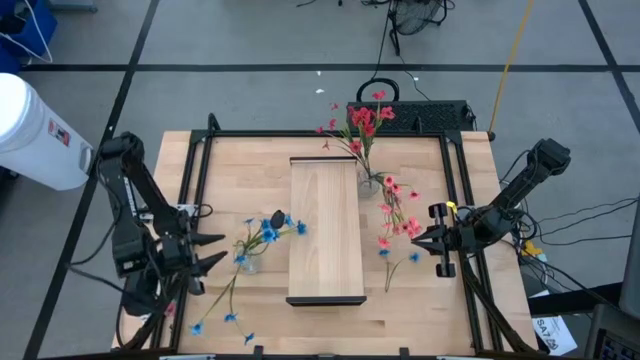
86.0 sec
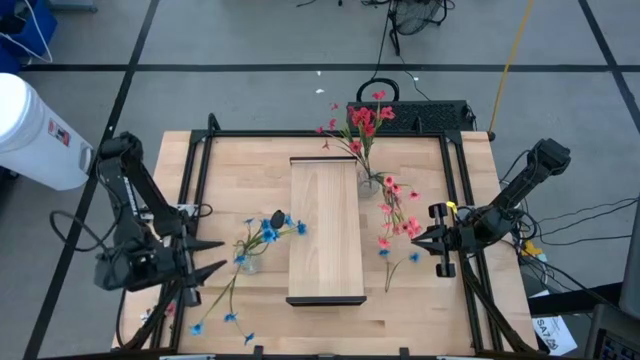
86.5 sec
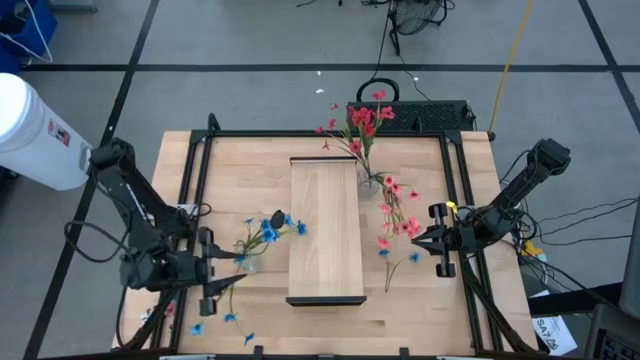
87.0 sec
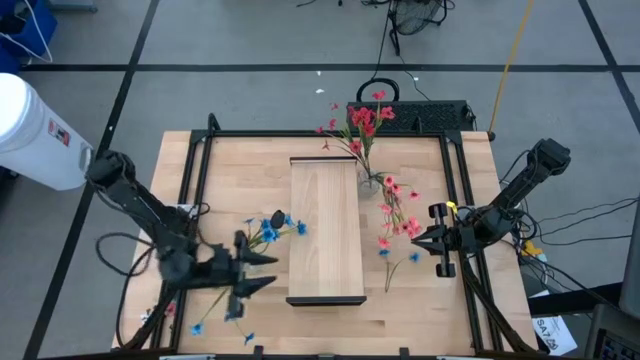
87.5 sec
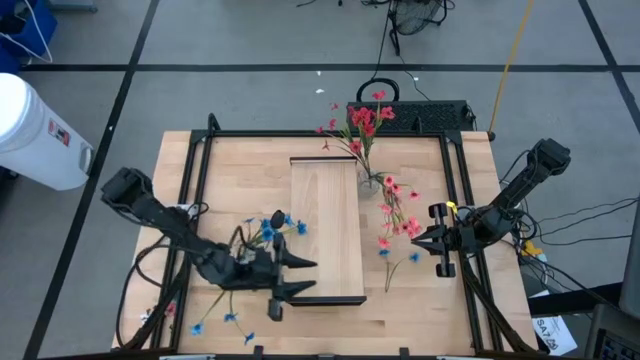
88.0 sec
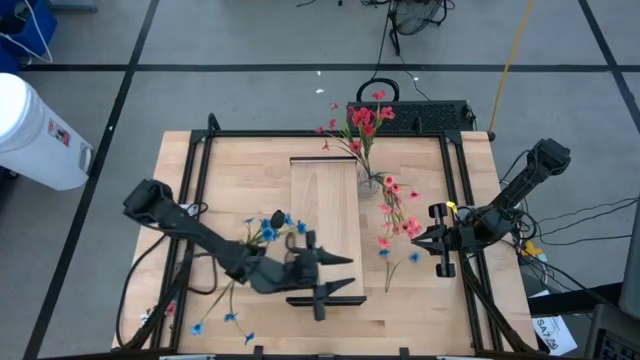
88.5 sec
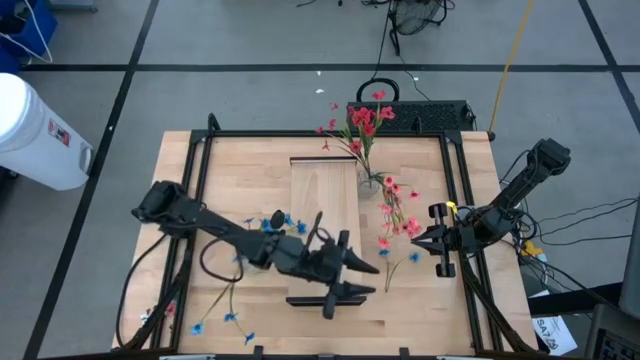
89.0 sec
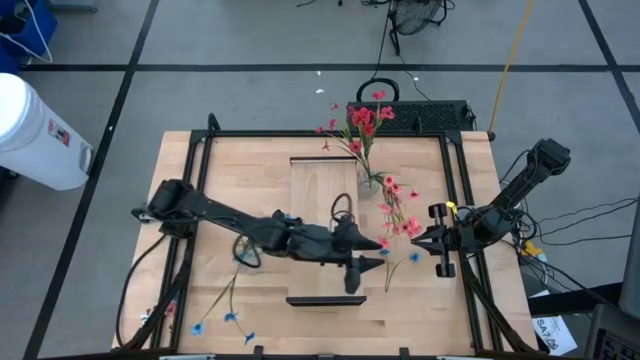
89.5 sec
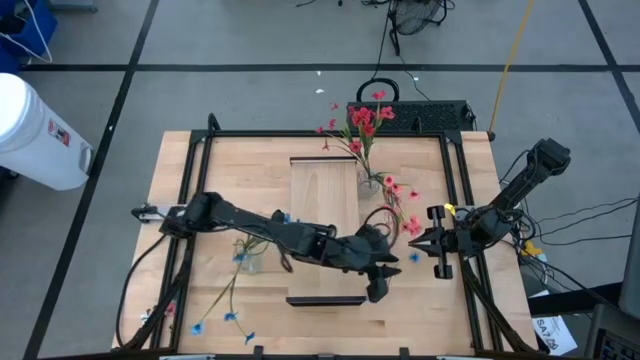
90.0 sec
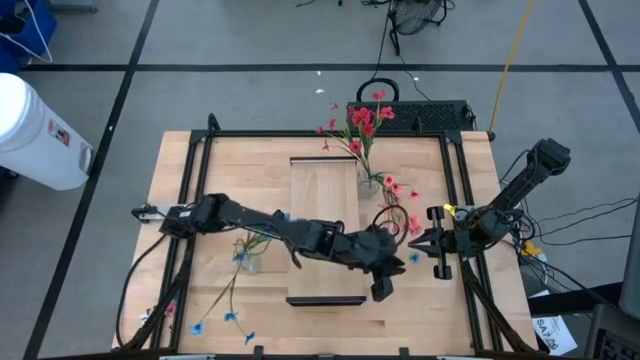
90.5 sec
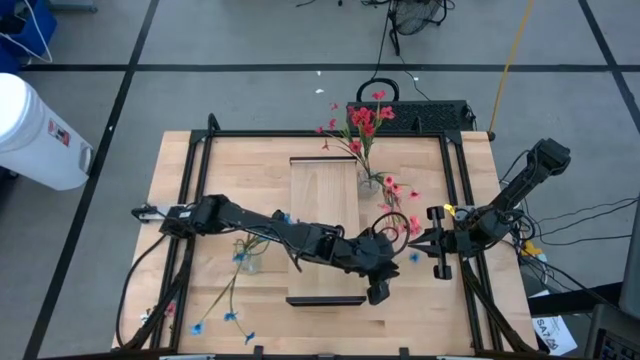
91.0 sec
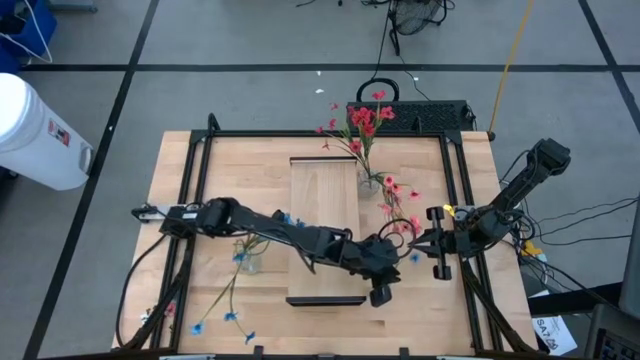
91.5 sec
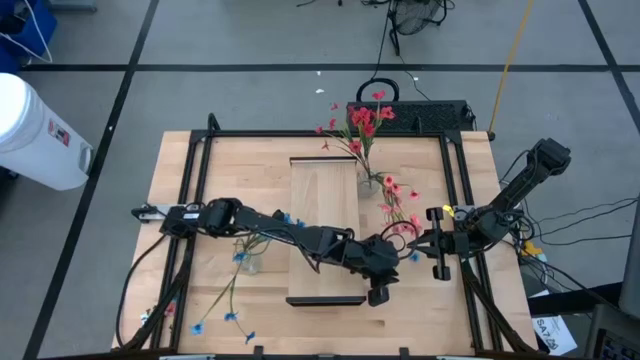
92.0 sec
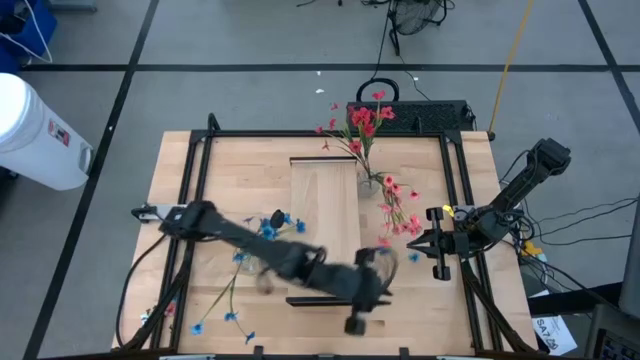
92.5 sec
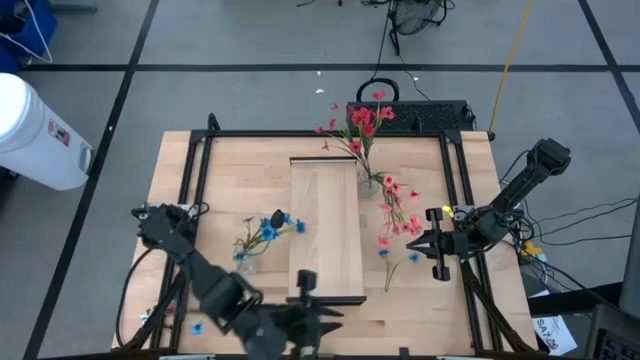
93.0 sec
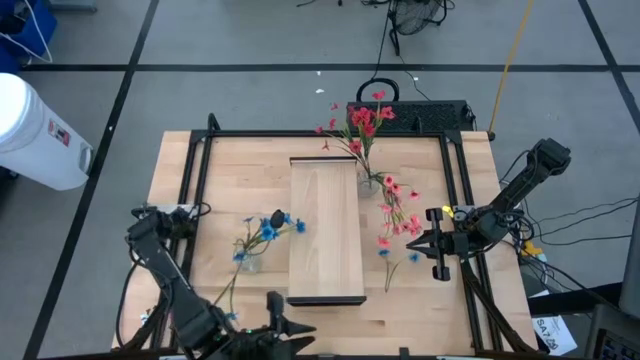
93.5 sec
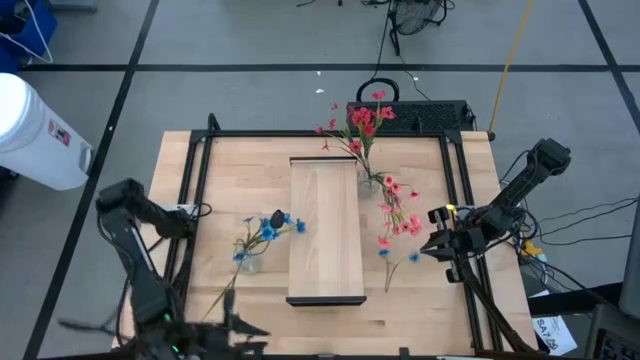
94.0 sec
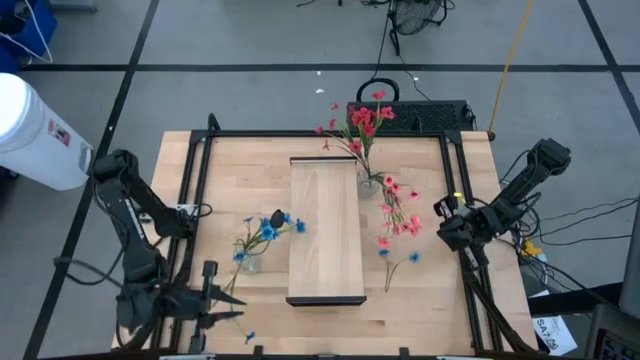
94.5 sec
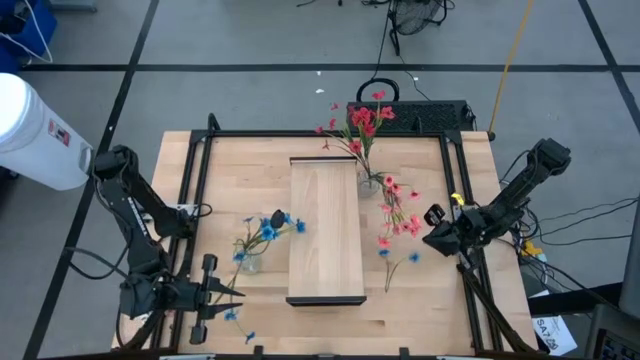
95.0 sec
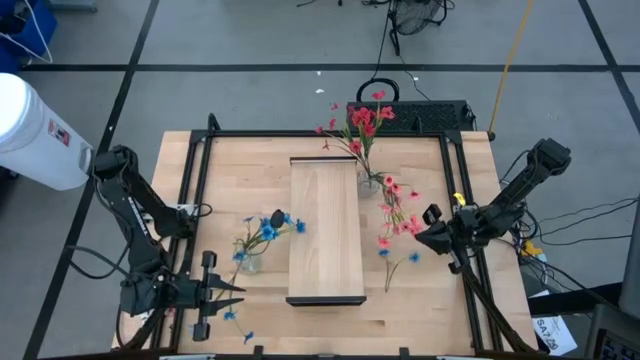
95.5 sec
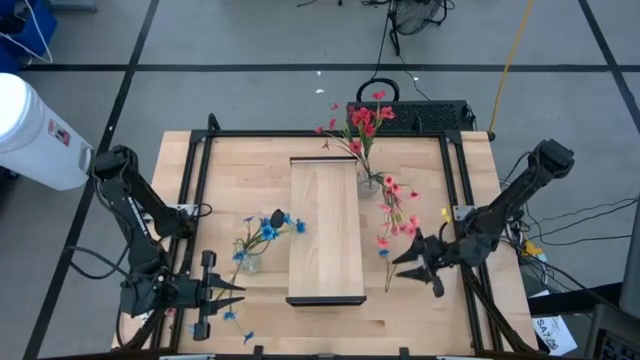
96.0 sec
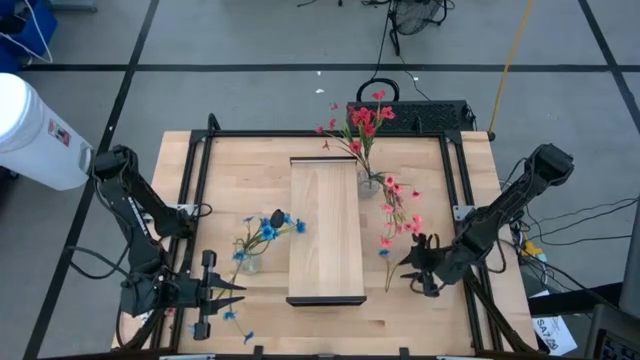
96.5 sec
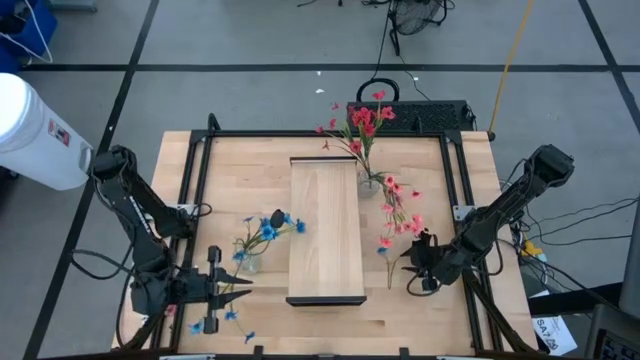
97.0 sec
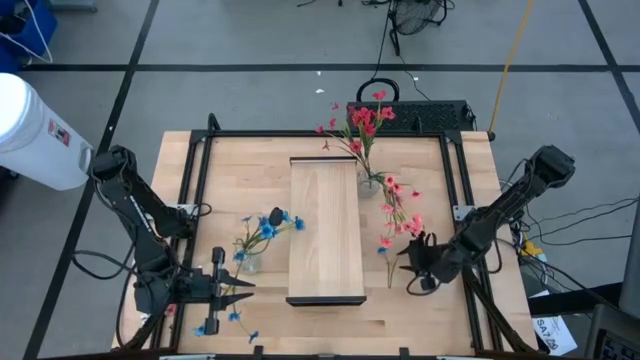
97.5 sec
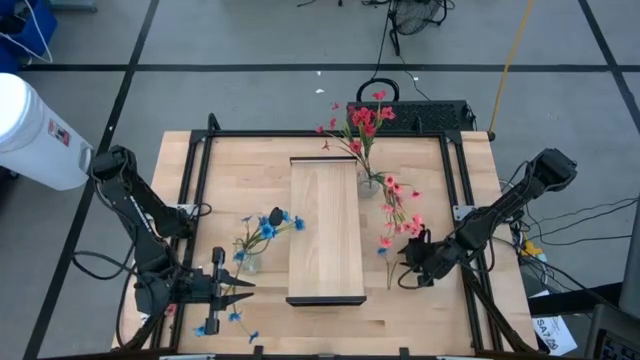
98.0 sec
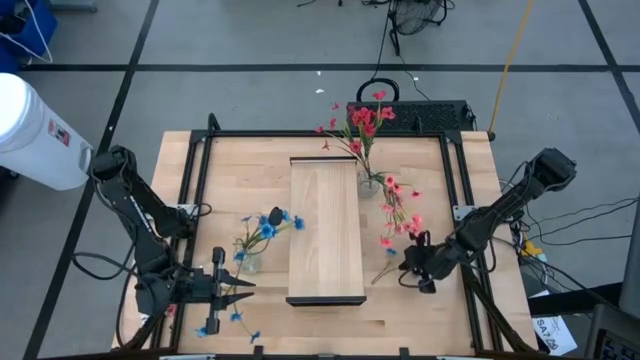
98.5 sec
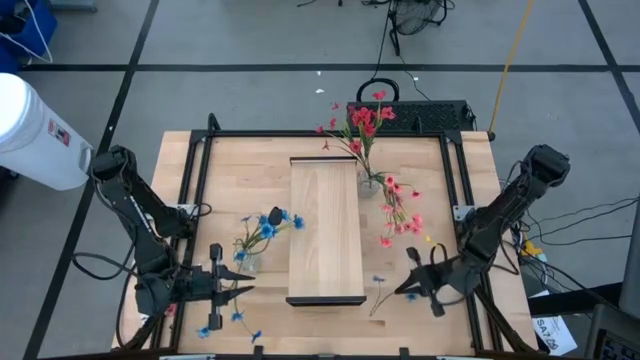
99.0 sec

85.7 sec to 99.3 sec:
Task: Pick and place flowers into a vace then onto a shelf
Put the blue flowers into the left transparent vase

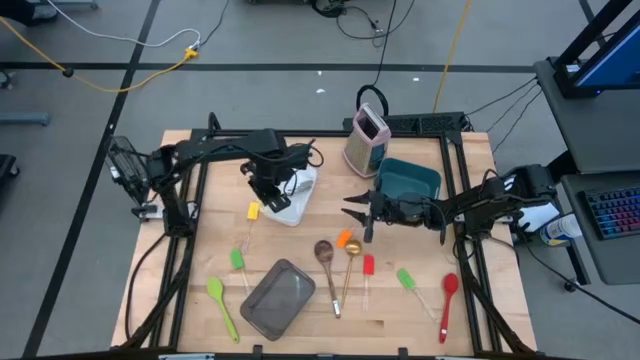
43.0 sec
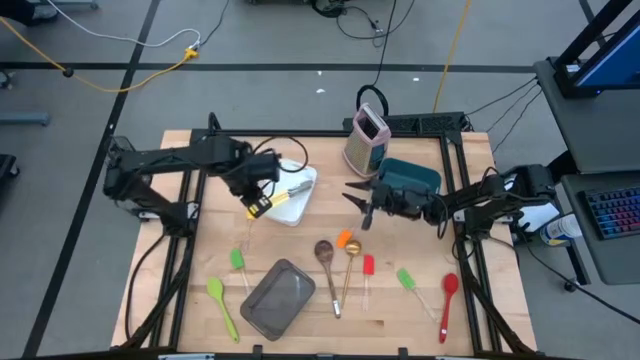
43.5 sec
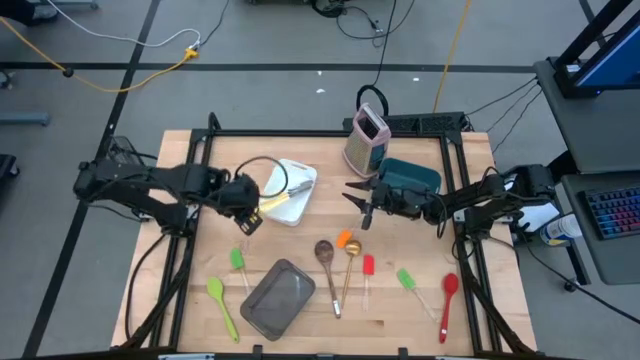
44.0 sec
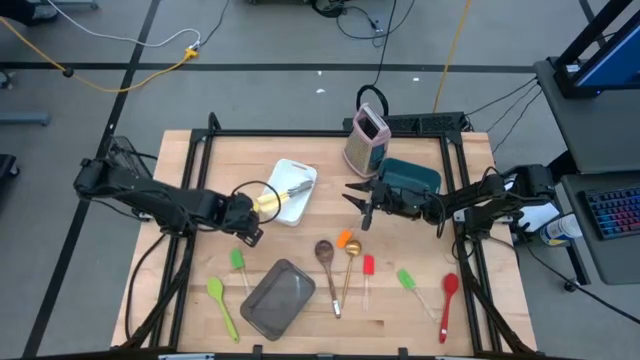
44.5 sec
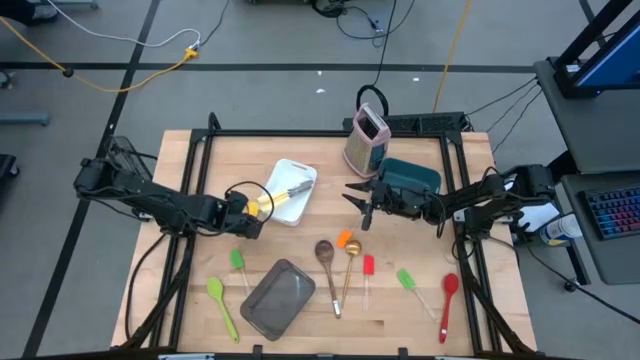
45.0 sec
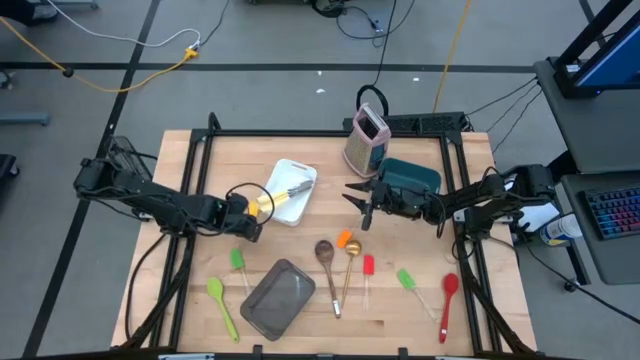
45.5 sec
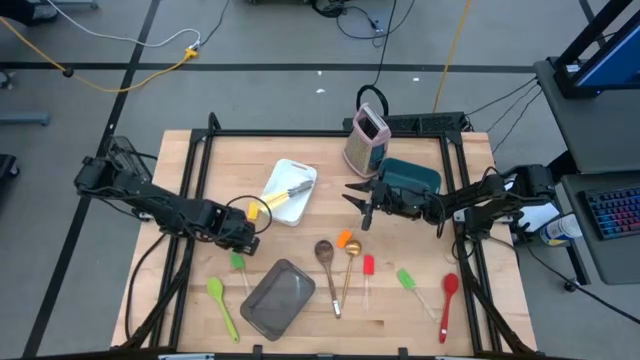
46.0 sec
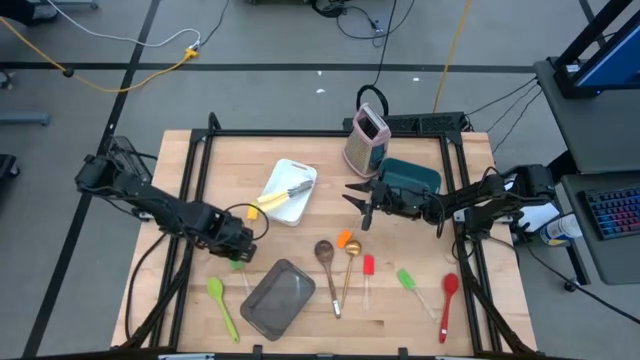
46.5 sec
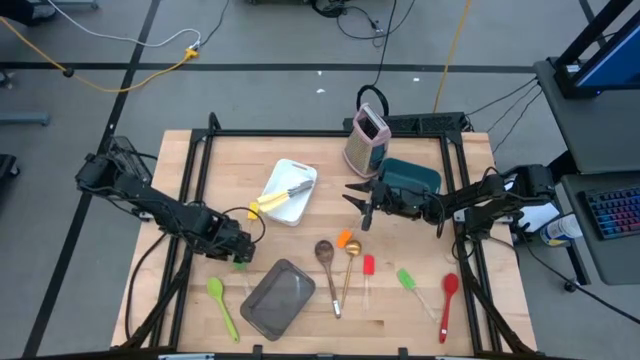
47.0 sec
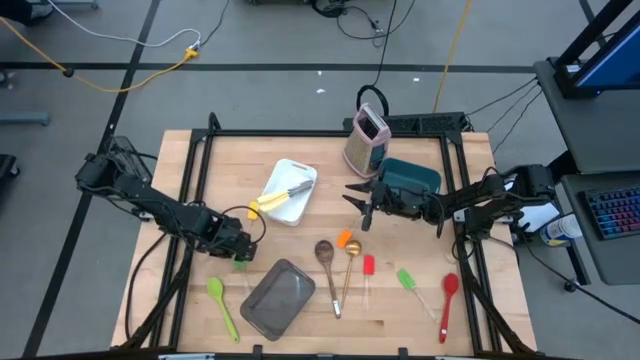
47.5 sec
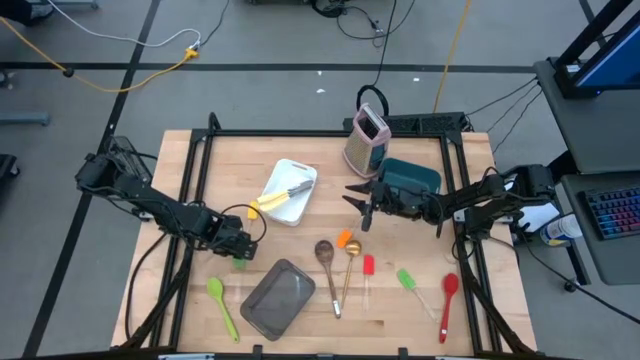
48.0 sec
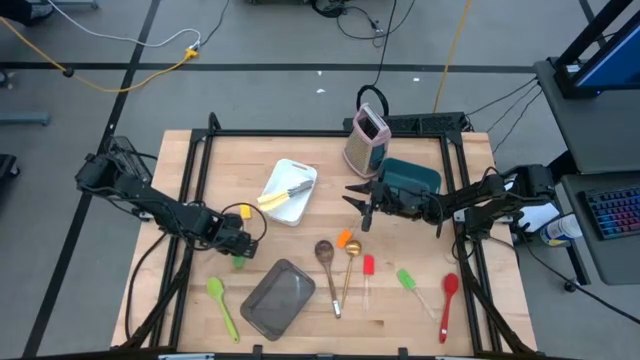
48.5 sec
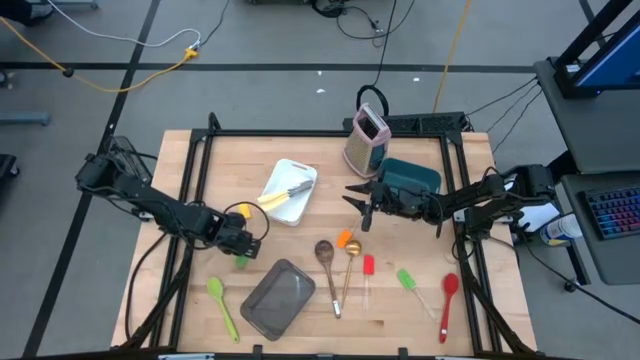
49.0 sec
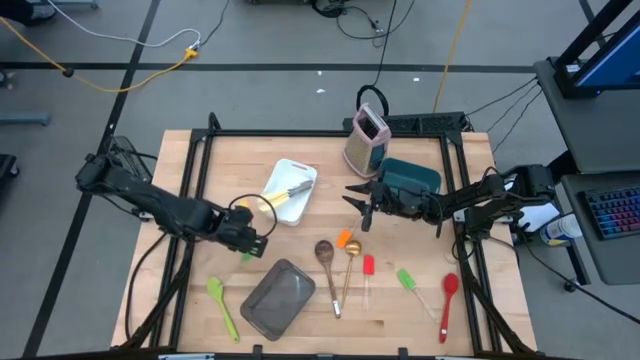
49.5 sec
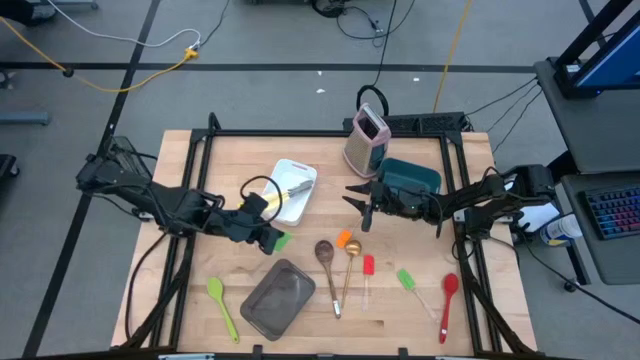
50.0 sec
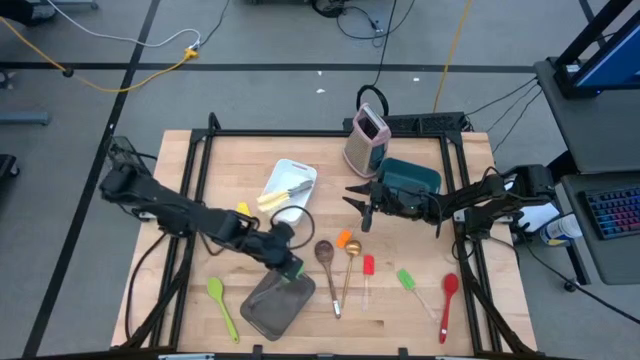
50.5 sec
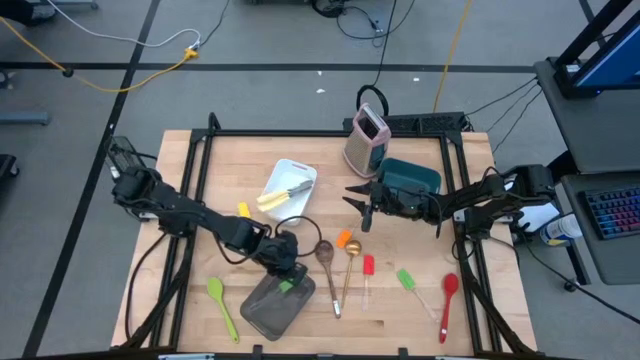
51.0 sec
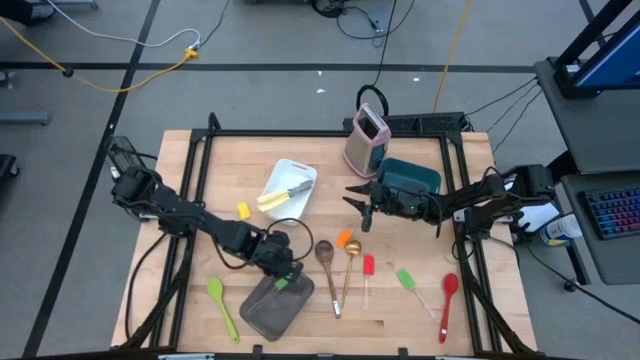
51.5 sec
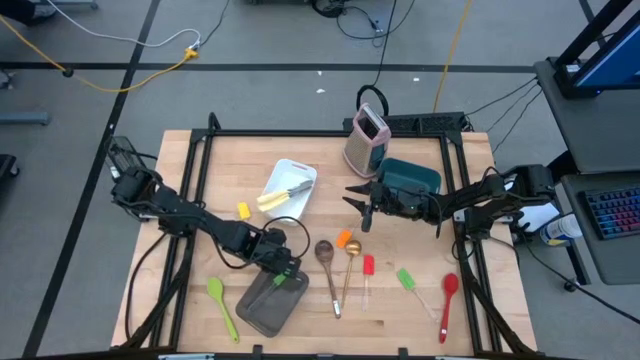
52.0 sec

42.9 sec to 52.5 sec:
Task: Pick & Place Kitchen Items
Put the left green spatula into the black bin
